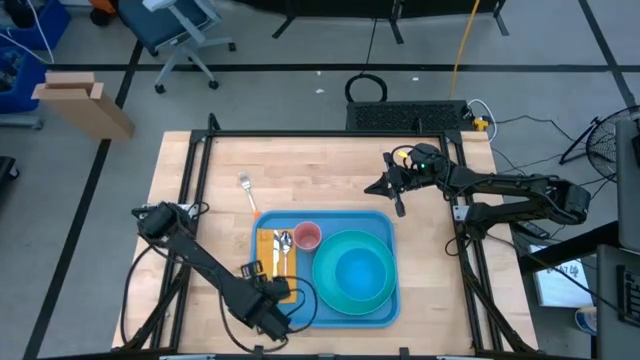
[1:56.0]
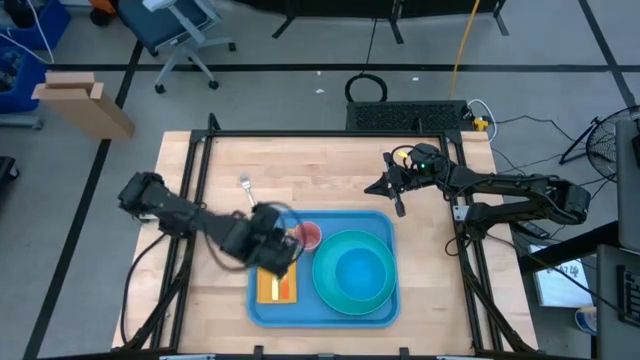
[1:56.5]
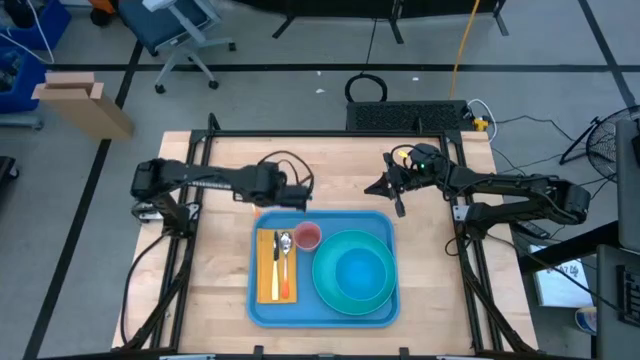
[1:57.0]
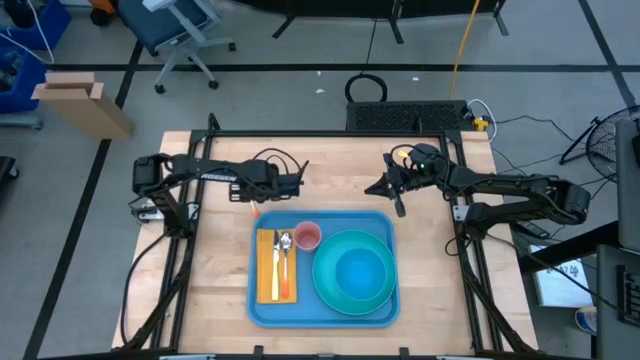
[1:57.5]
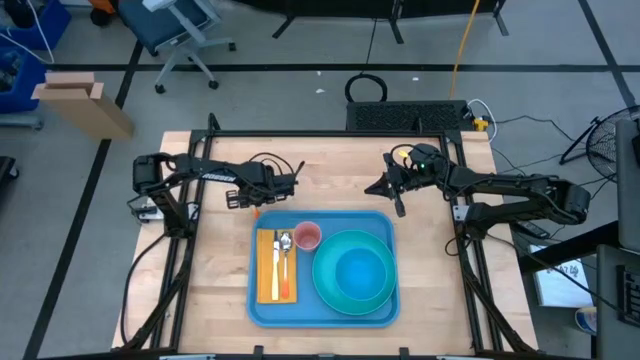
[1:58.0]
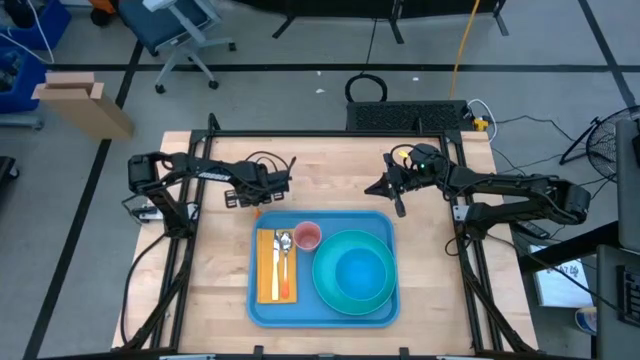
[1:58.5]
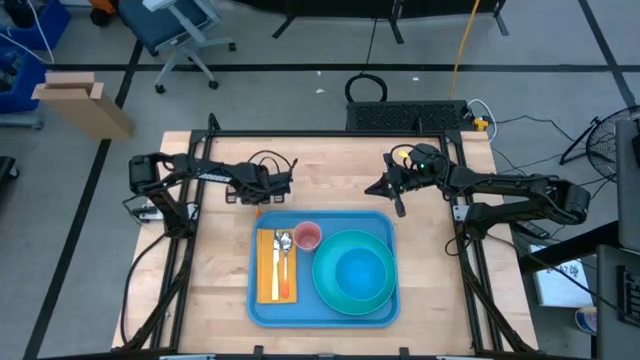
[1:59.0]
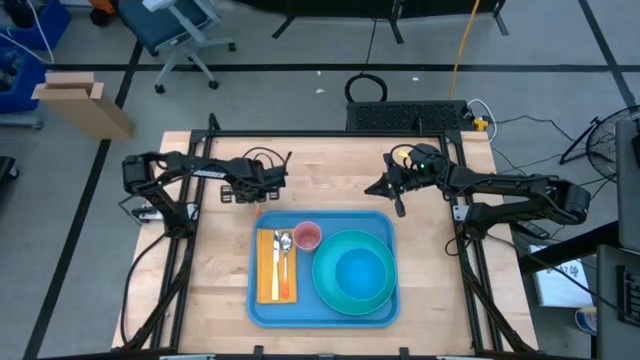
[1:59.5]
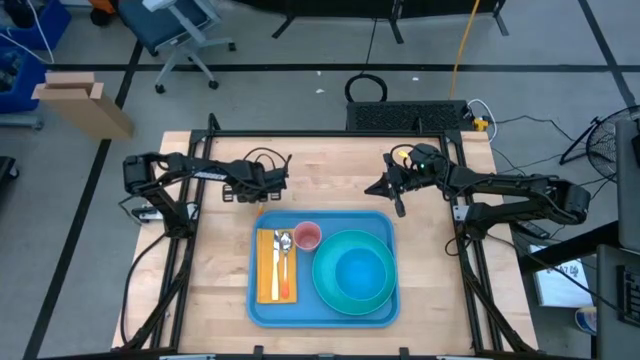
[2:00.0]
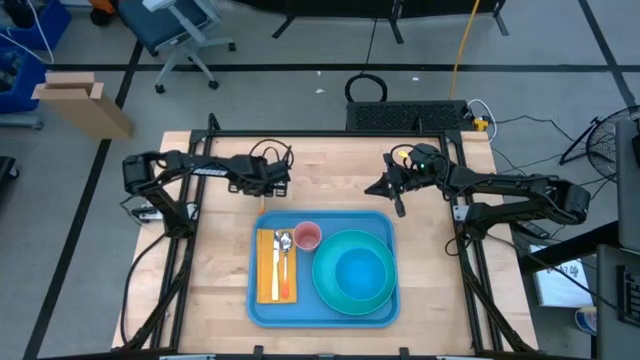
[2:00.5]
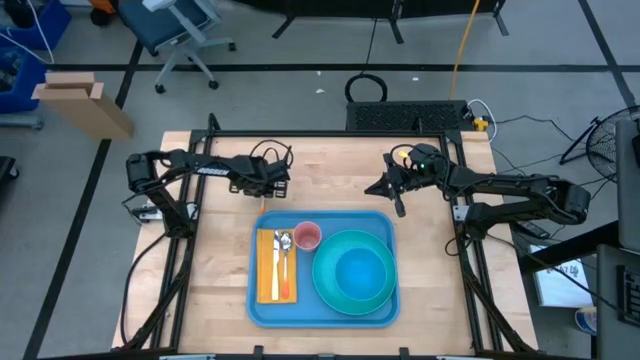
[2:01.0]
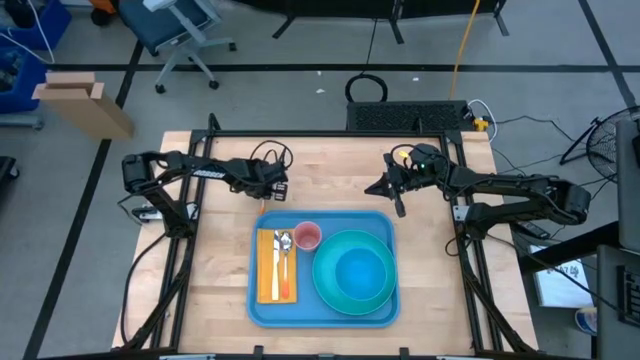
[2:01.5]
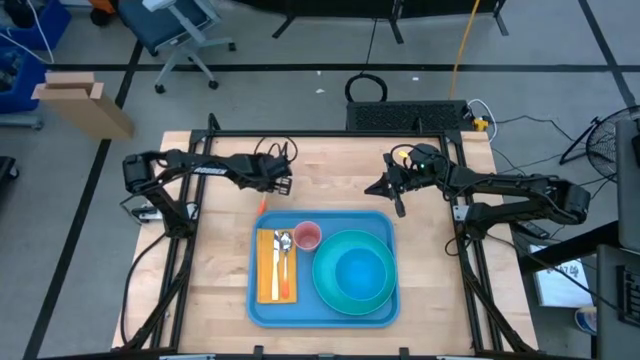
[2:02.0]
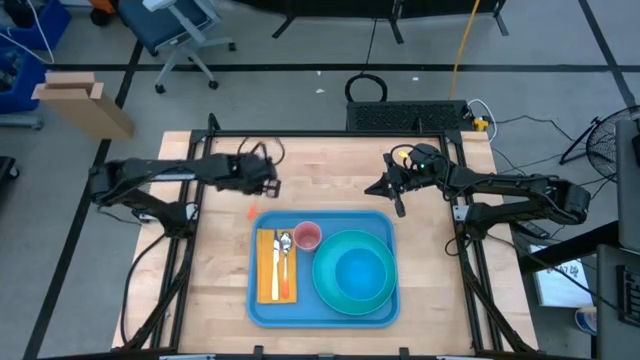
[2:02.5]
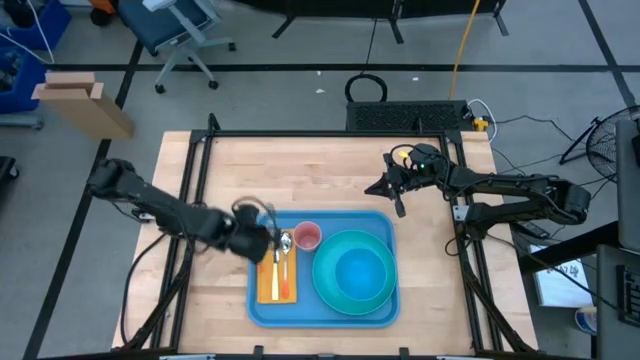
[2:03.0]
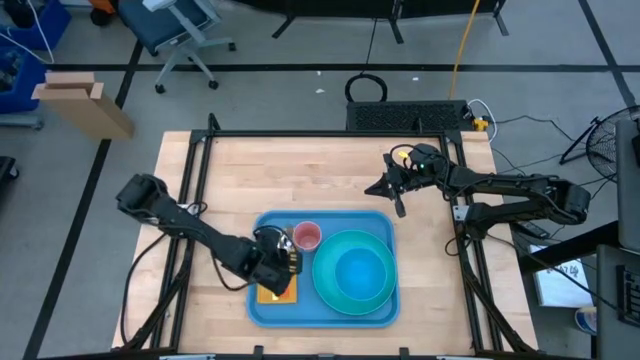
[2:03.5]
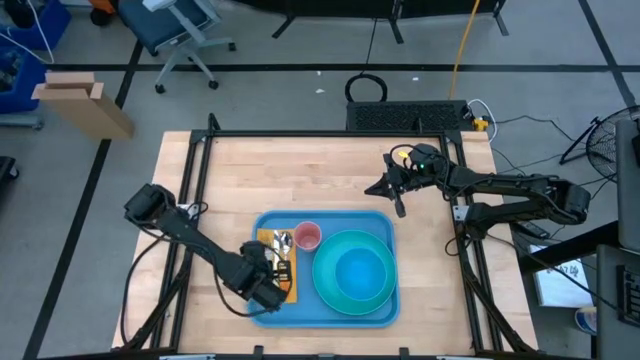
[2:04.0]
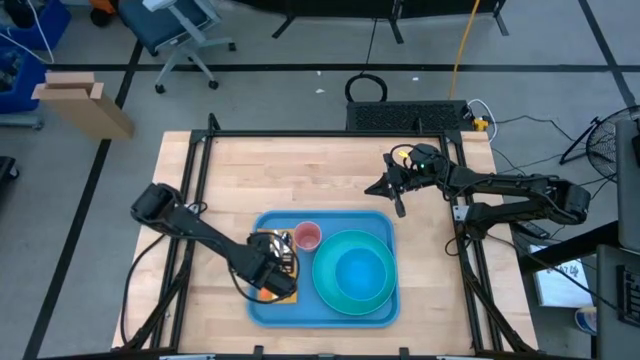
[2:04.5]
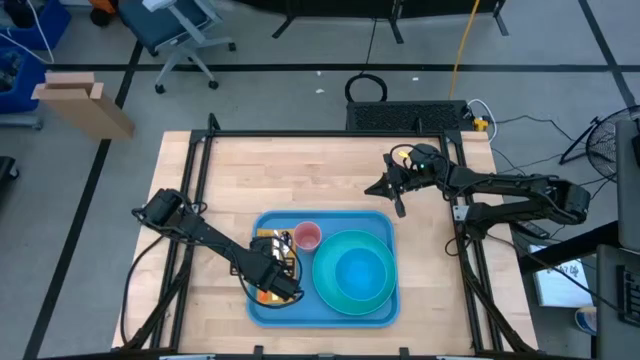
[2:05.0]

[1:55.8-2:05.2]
Task: Set up tray
Put the orange fork on the yellow napkin

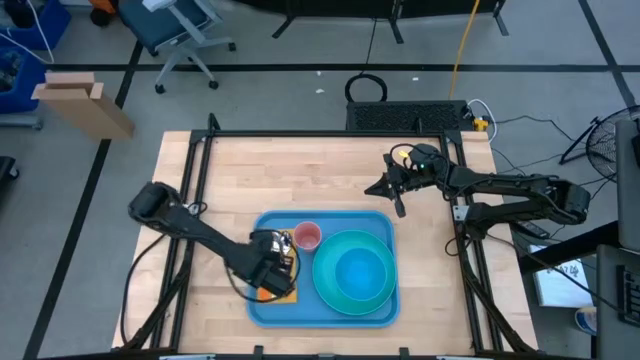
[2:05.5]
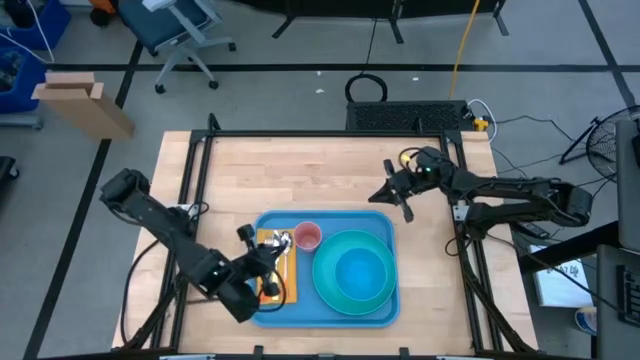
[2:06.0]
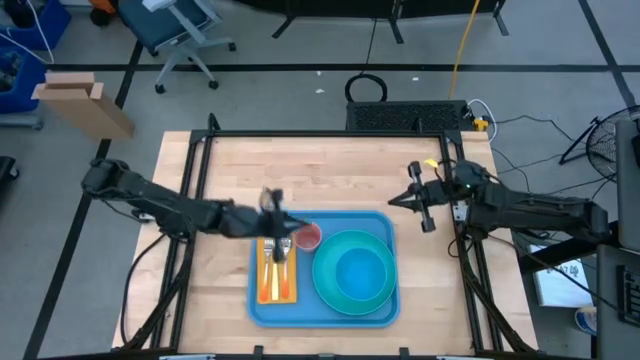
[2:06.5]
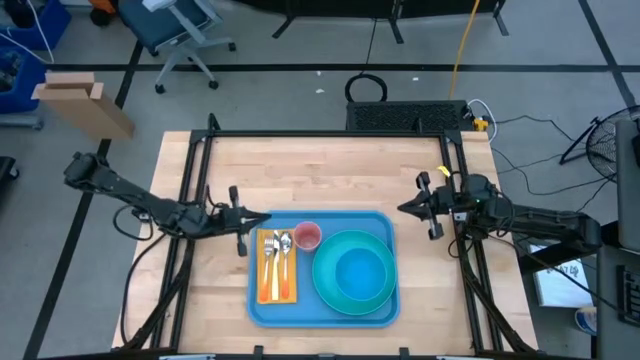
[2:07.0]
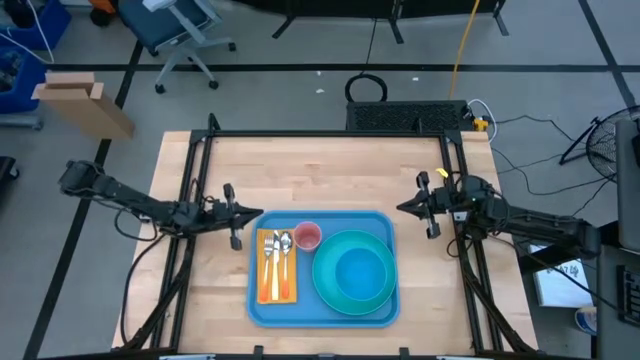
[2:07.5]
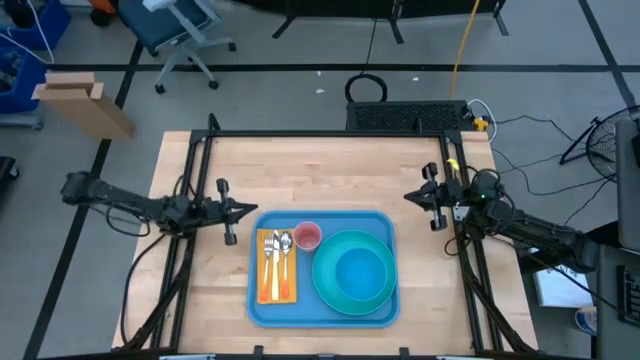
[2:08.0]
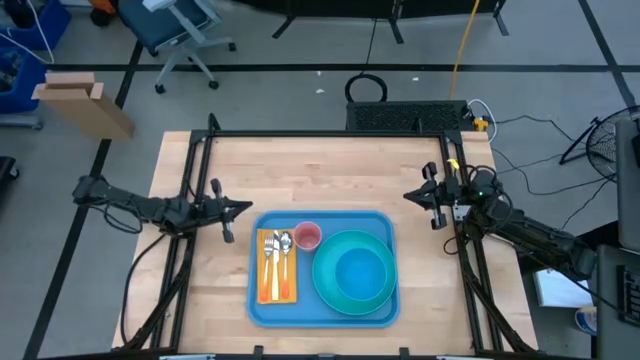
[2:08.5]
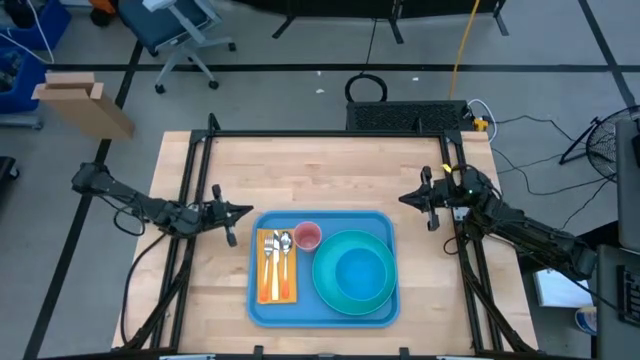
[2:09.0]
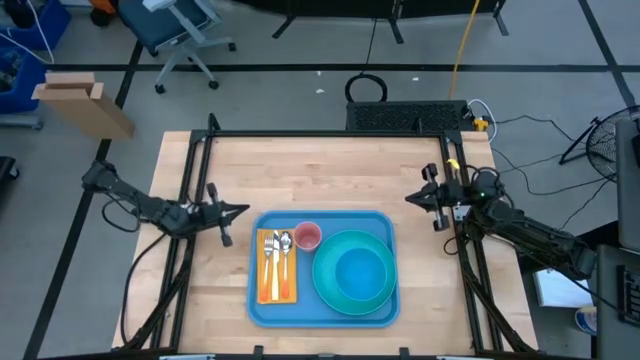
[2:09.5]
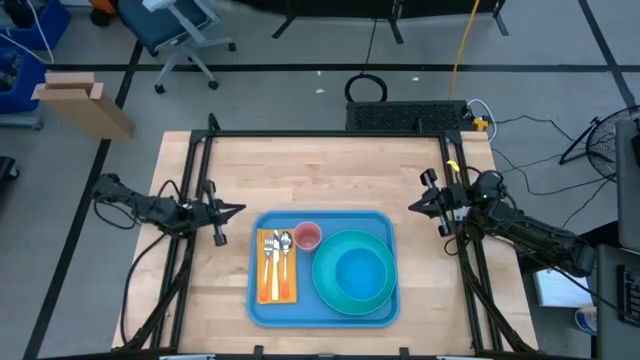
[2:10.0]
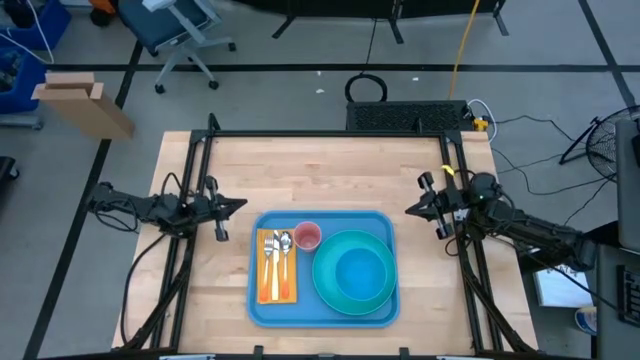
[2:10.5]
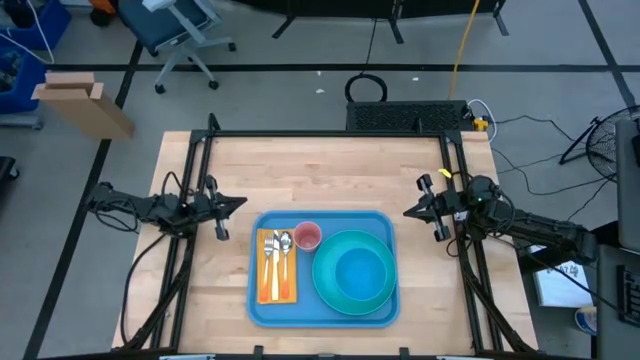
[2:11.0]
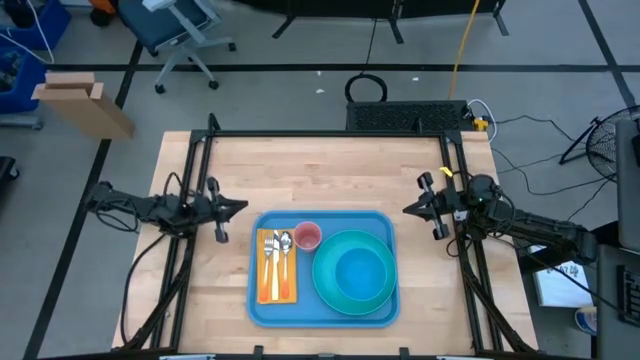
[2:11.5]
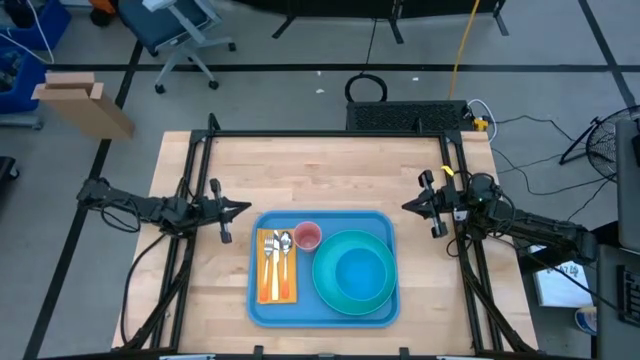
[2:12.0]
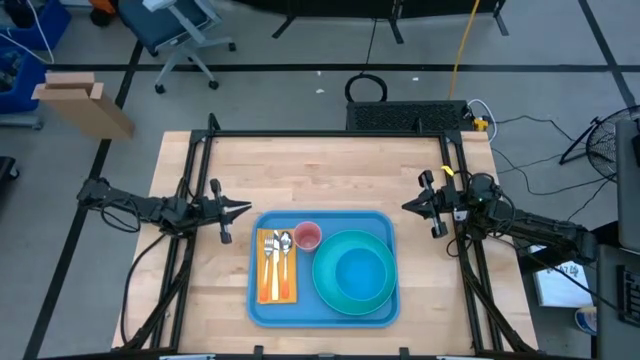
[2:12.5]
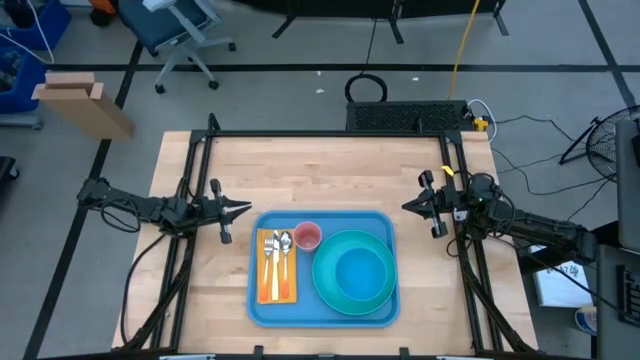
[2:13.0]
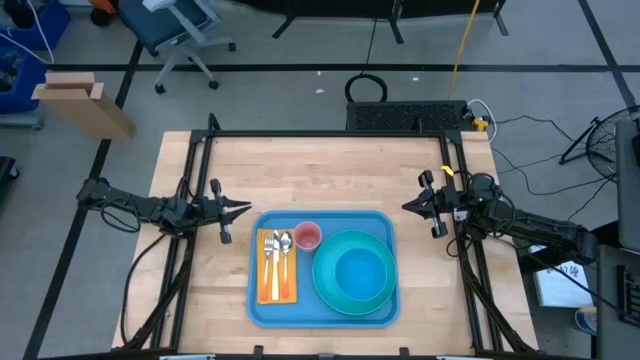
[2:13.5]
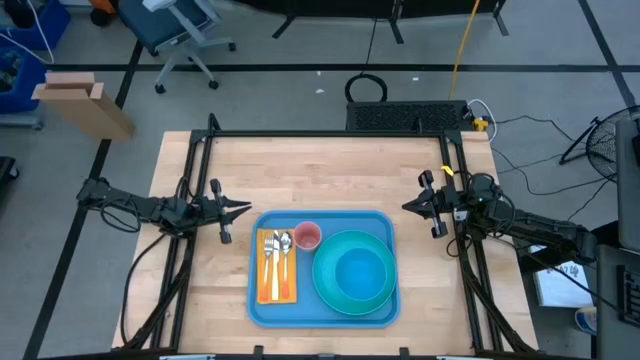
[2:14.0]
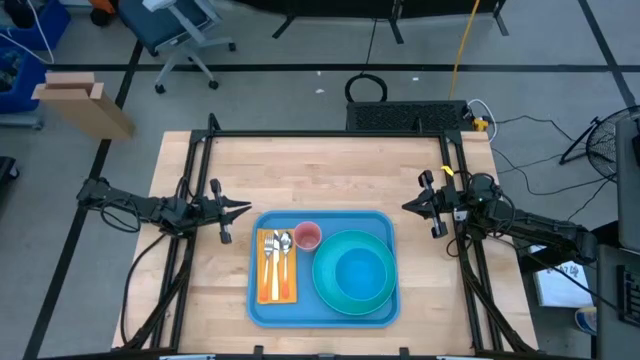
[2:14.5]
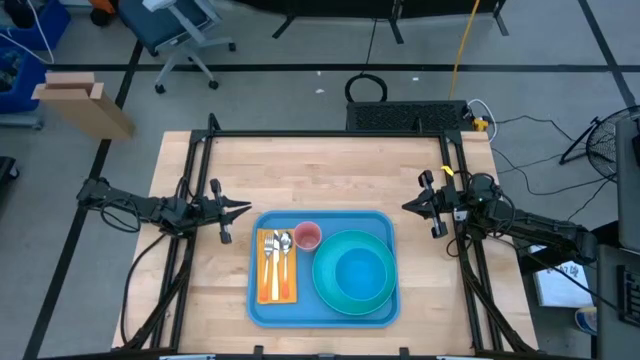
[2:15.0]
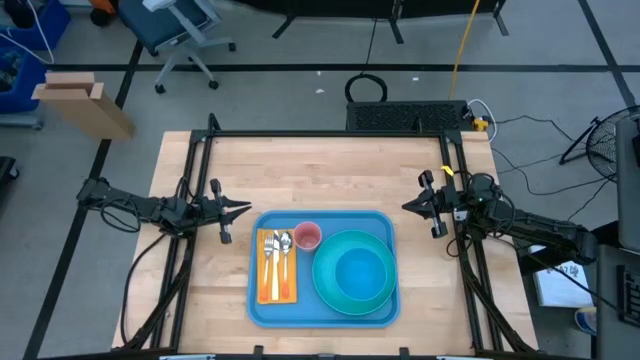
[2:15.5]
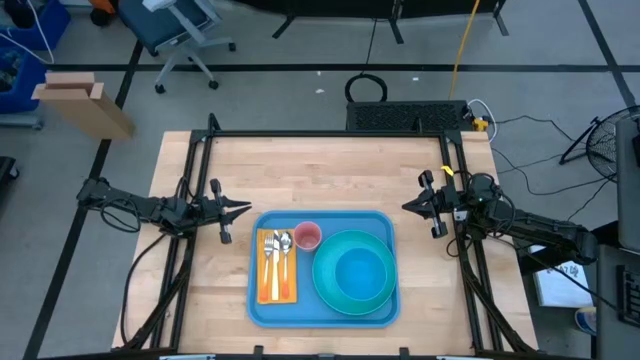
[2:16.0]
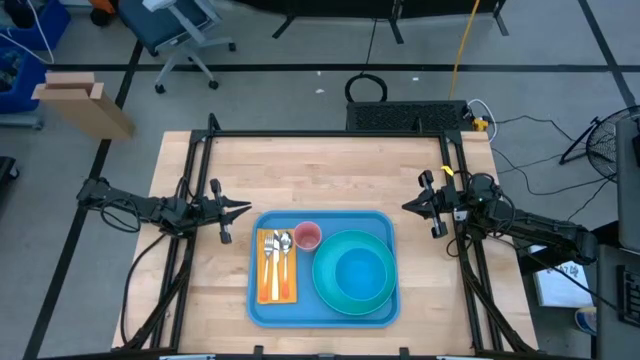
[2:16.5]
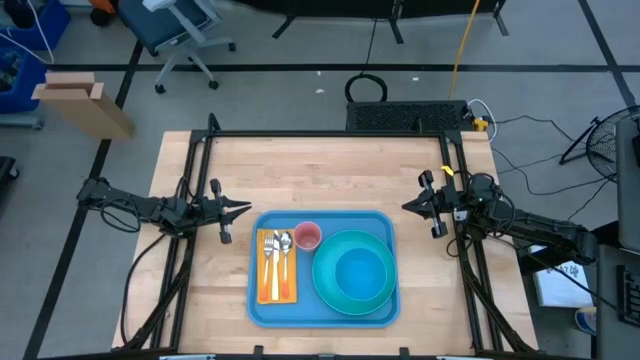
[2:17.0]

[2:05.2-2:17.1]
Return to Home Position

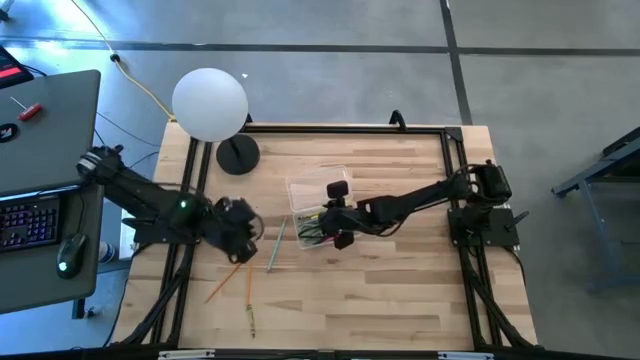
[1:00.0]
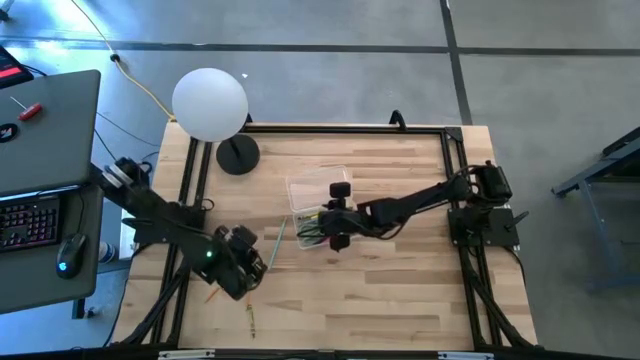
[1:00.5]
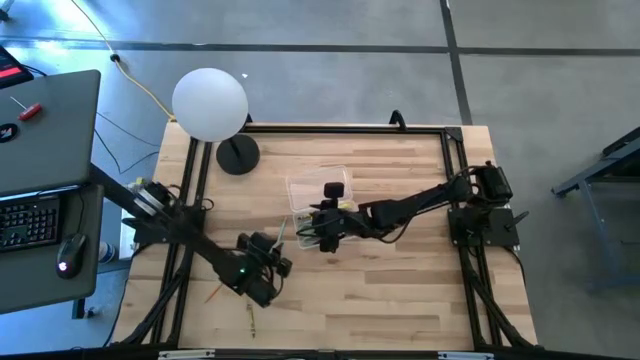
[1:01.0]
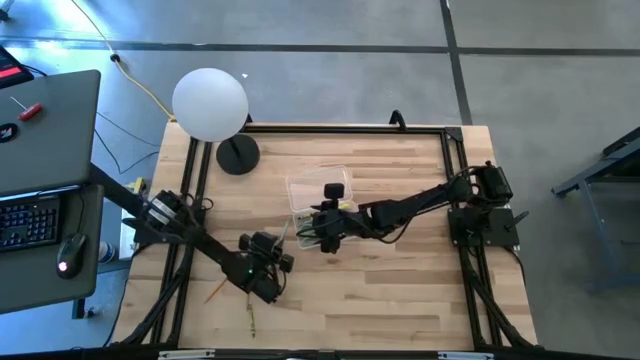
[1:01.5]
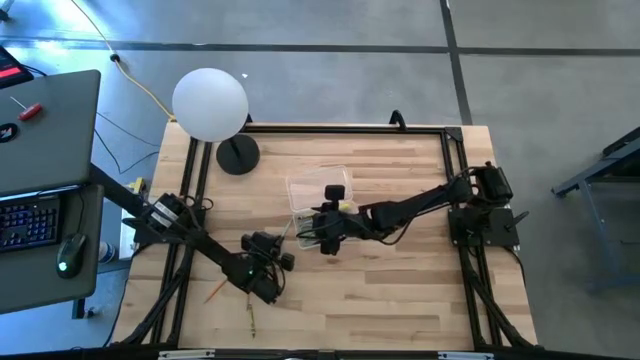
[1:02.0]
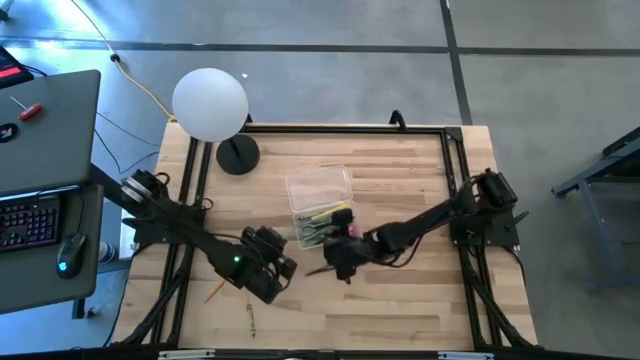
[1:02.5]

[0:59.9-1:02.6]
Task: Pick & place school supplies into a supply box
Put the blue pencil into the transparent supply box
